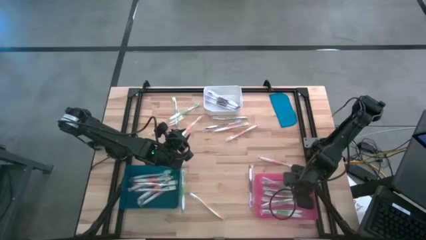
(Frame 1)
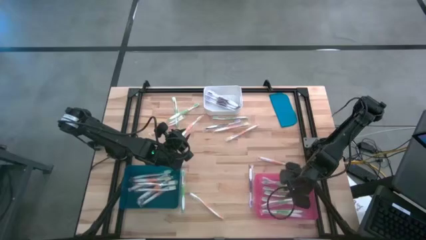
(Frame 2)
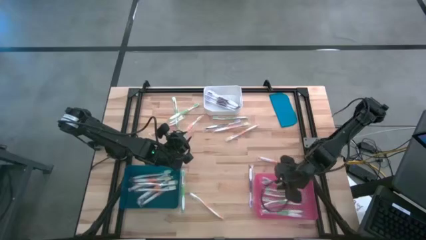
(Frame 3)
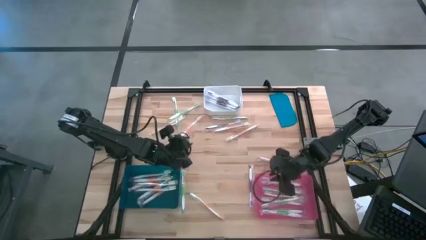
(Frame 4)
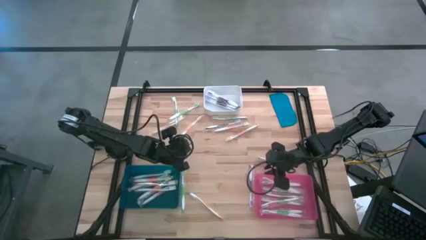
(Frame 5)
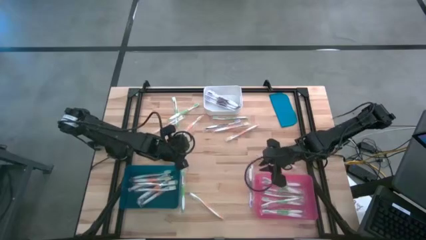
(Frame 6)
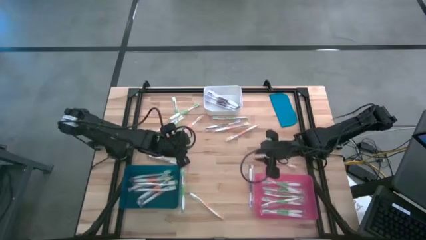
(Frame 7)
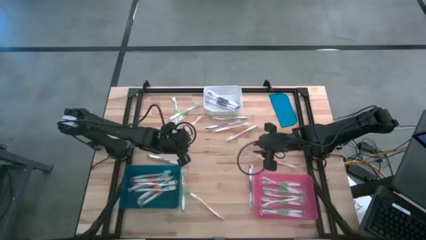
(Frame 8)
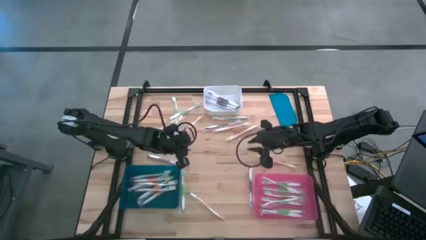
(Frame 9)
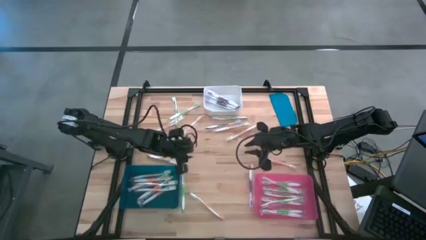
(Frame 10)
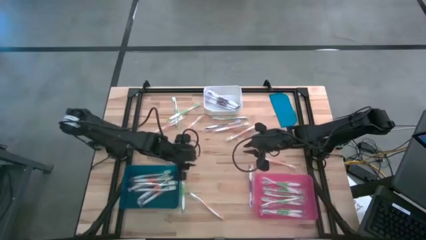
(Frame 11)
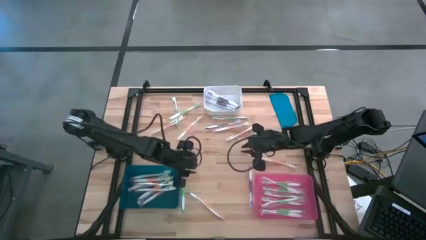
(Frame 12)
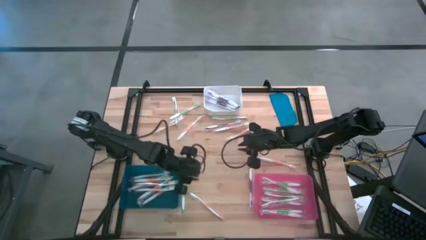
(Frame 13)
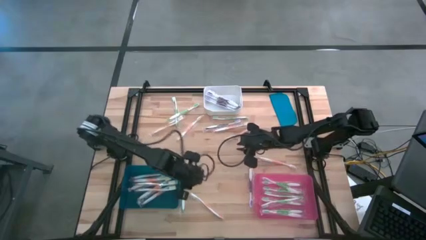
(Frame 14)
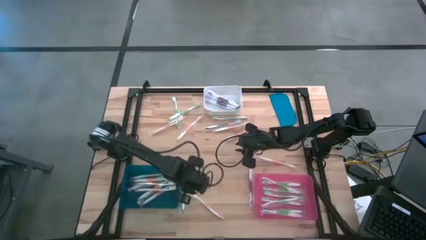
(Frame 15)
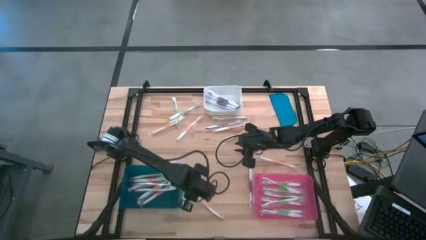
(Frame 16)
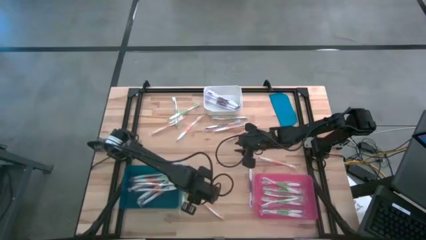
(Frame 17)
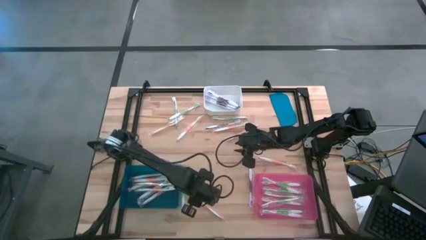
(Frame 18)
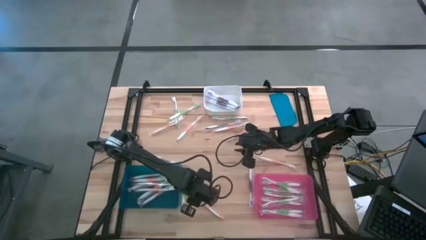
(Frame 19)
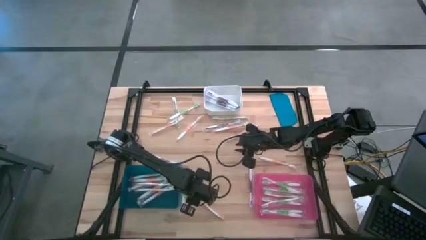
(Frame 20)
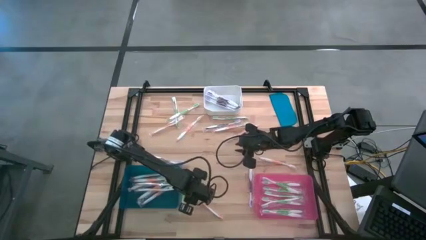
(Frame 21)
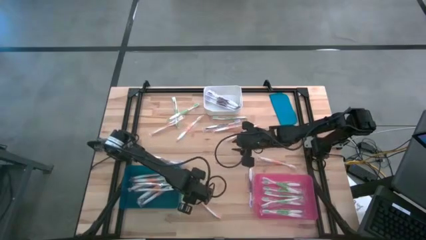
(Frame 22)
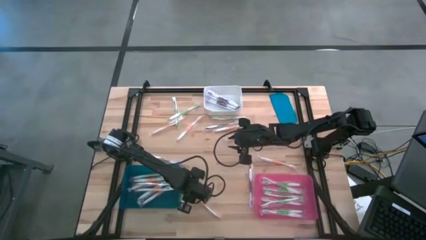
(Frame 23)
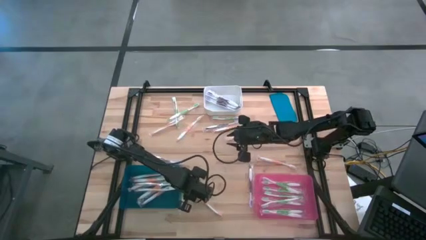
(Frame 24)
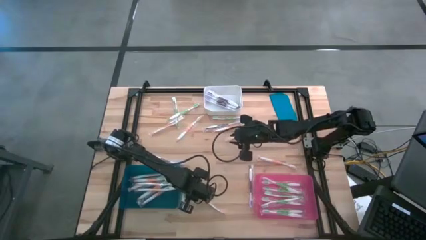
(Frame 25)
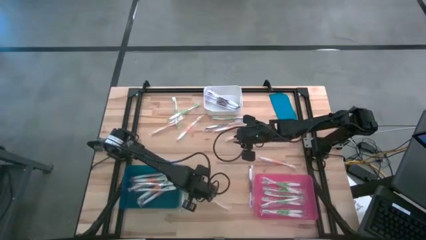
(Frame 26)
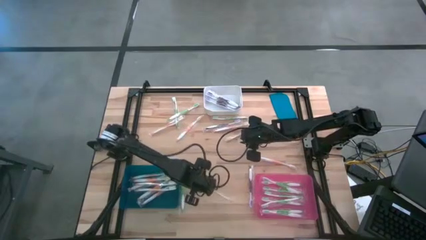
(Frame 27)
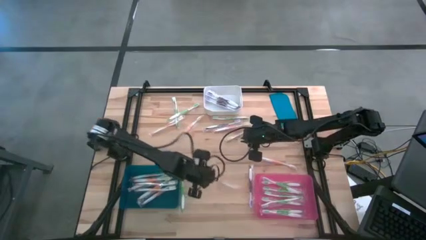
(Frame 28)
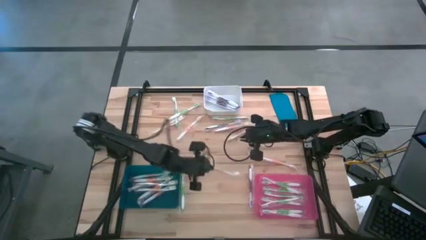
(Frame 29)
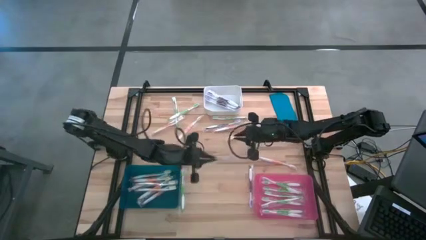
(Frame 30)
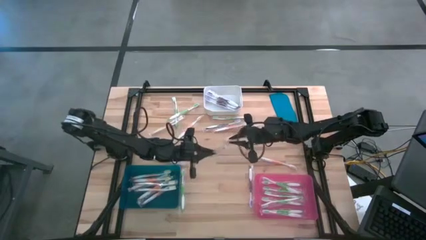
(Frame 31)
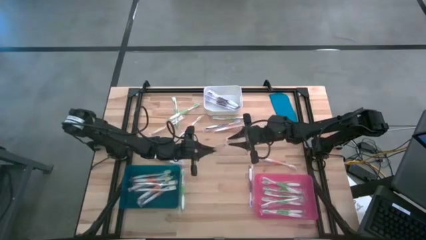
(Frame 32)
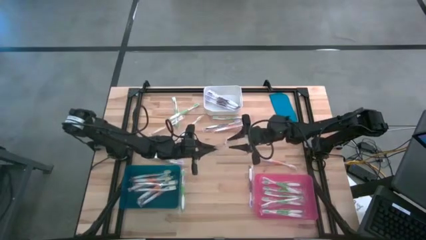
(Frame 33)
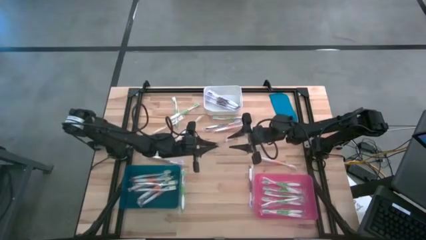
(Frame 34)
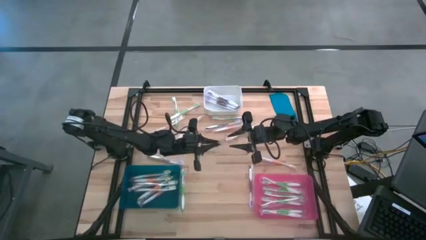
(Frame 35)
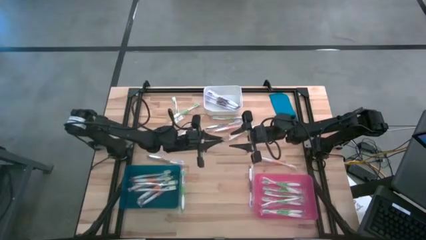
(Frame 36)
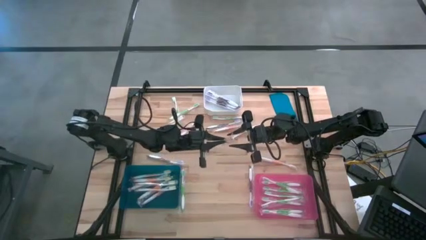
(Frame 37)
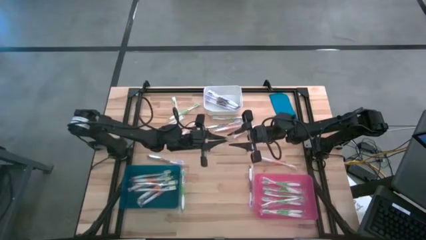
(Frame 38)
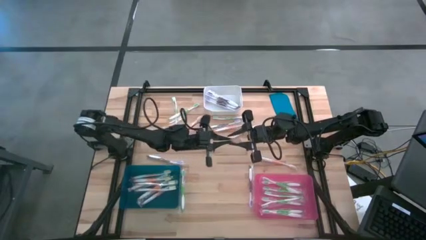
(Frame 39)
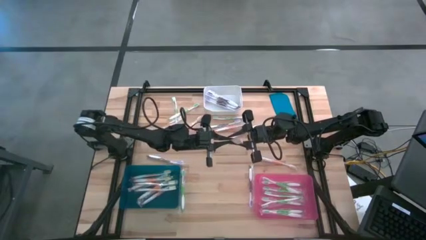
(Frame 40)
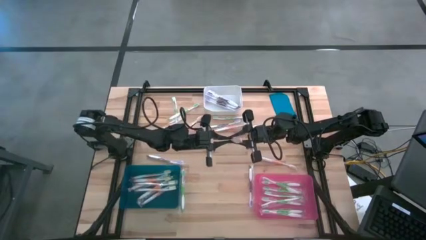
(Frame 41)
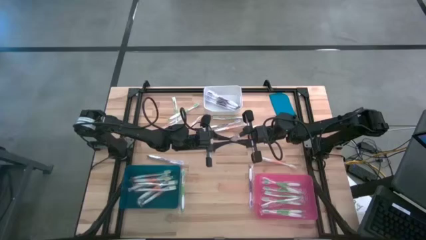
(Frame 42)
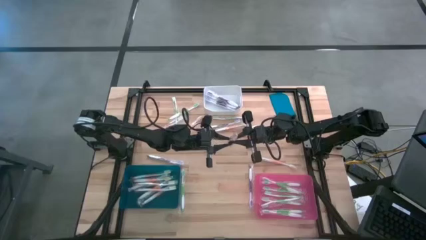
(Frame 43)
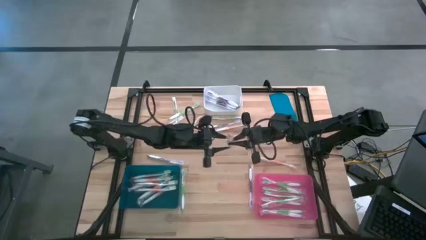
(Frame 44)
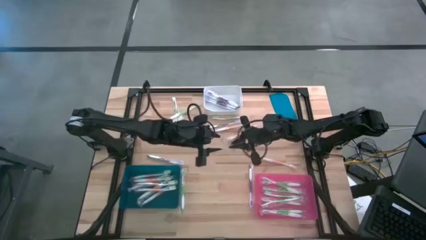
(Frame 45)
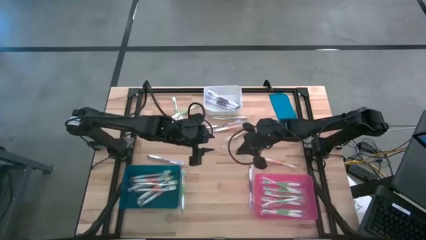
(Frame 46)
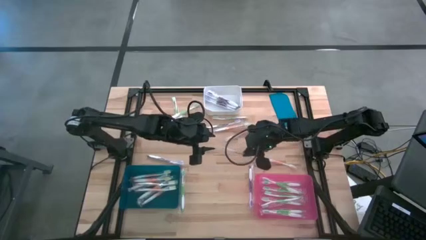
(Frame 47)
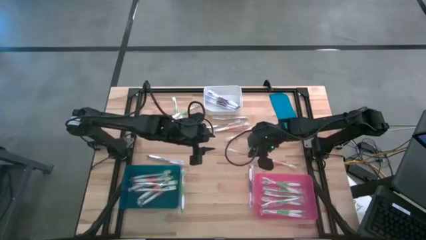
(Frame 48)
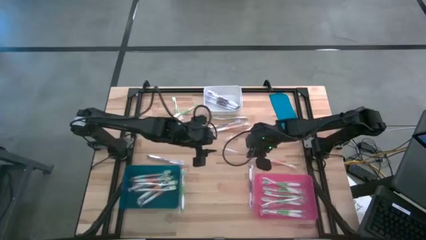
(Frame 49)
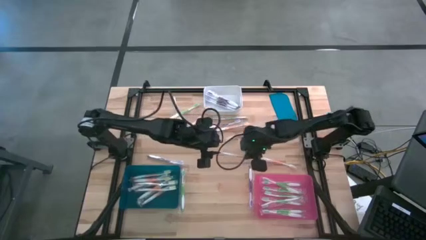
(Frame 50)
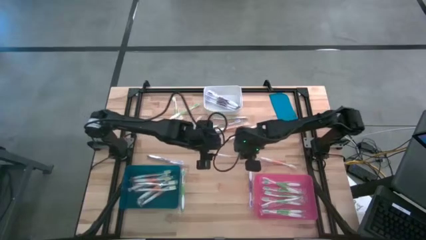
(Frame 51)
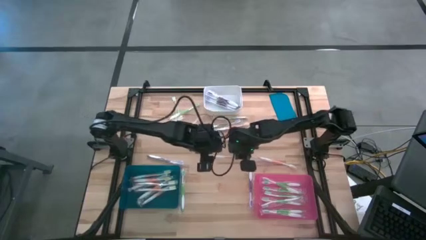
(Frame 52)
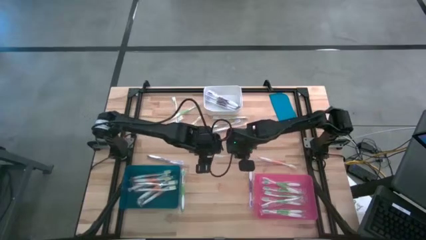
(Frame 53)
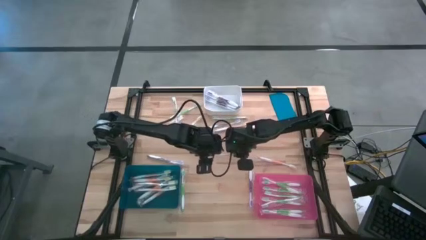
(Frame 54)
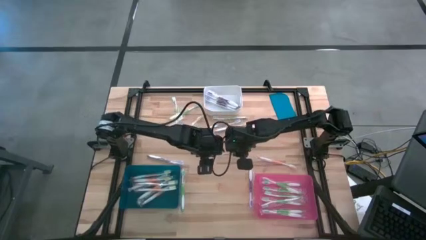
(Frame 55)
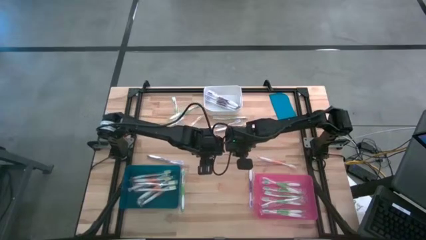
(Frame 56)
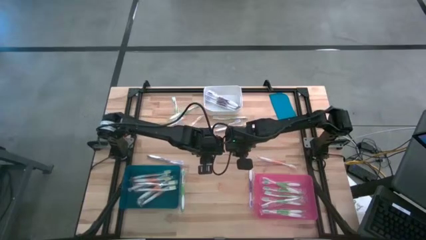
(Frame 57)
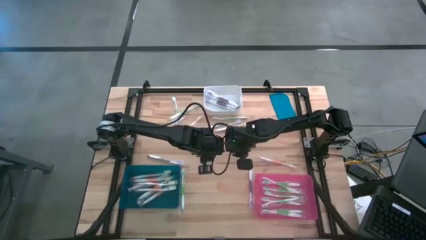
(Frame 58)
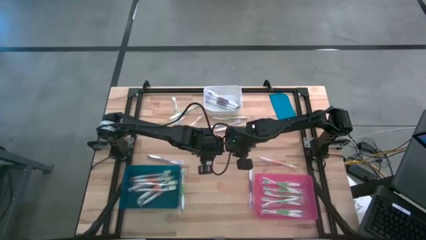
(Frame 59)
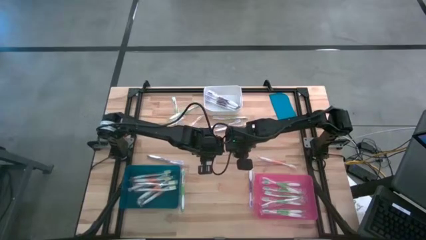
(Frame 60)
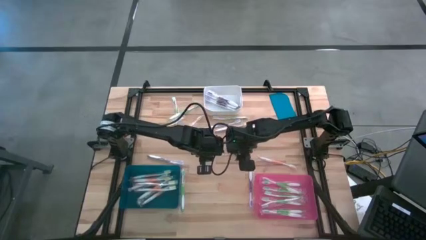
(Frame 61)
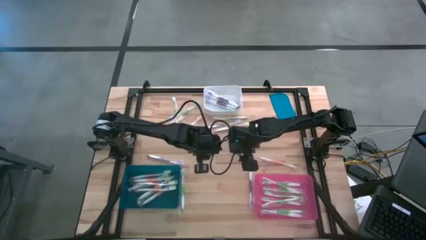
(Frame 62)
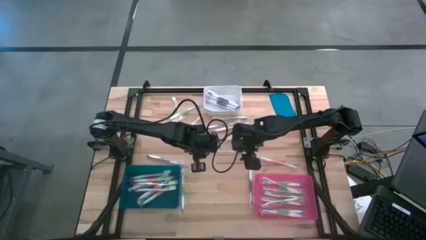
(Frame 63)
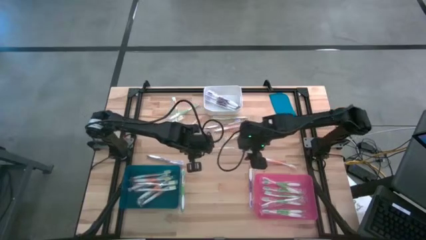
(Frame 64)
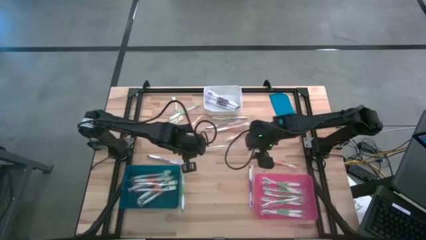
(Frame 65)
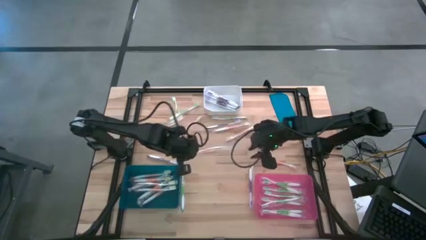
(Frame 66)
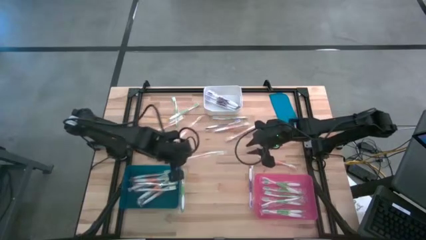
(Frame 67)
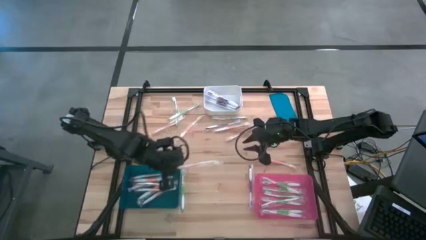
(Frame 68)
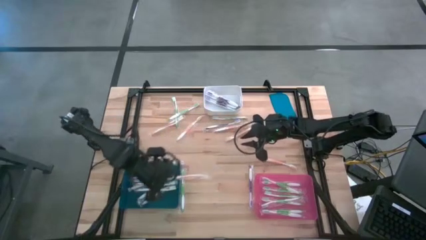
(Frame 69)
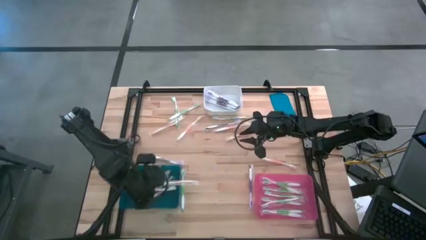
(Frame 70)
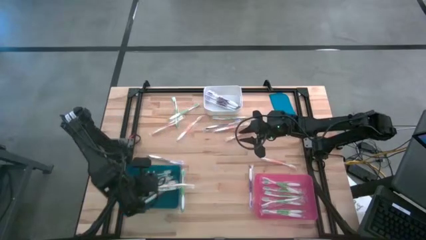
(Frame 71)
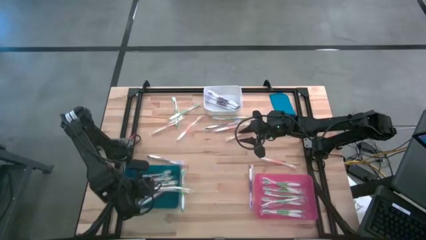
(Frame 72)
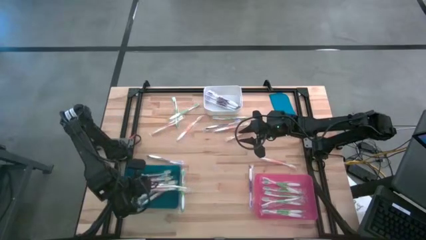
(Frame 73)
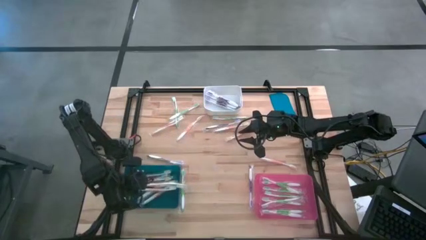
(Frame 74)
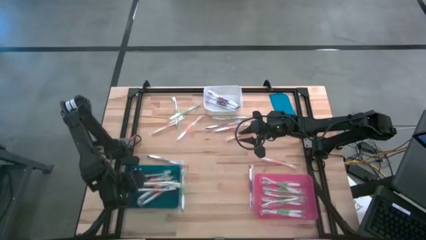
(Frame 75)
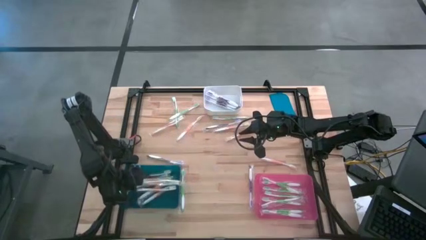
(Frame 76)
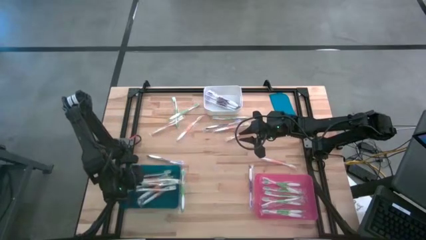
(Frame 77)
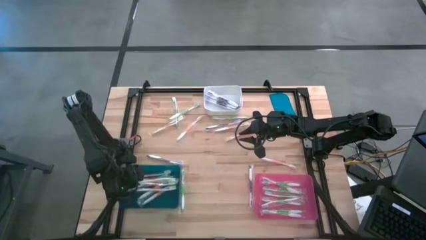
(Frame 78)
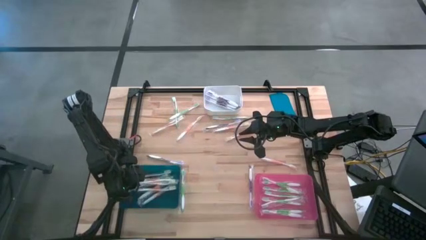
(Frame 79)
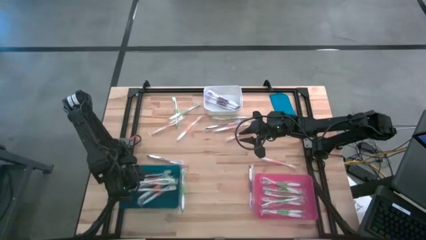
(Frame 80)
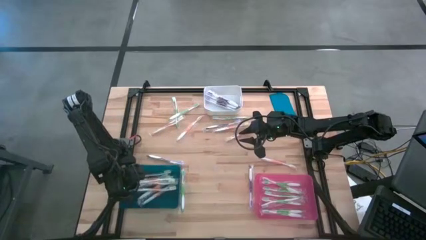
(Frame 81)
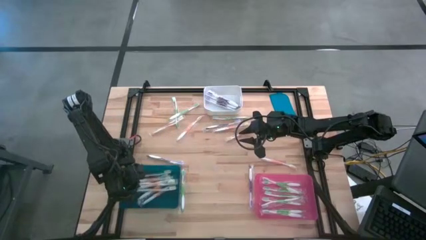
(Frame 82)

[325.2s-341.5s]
Task: Pick & Place Toothbrushes
Put the orange toothbrush into the blue bin
